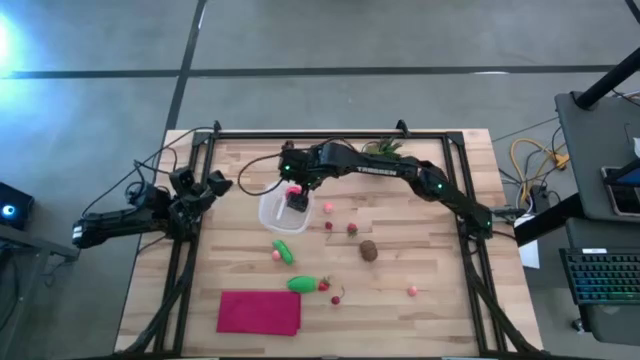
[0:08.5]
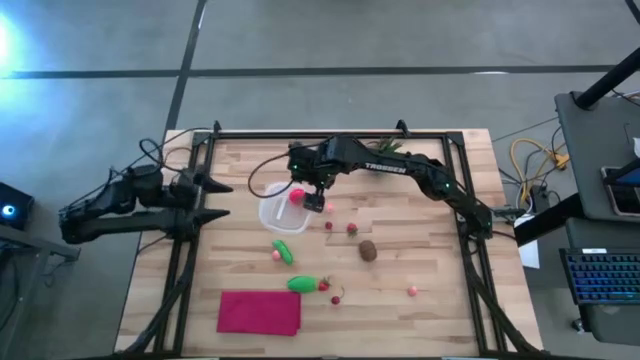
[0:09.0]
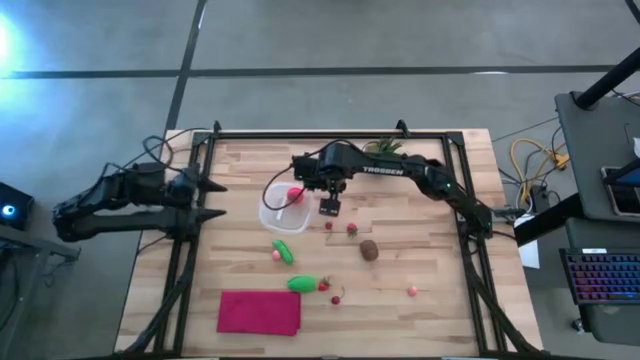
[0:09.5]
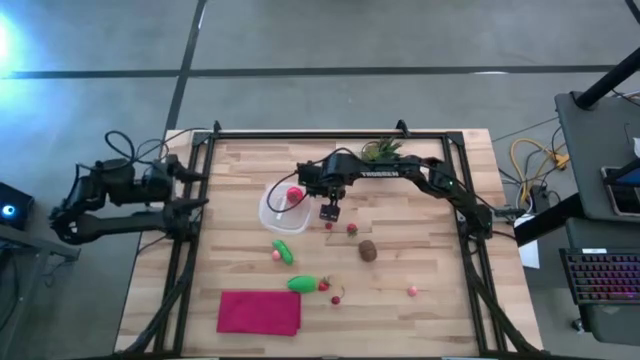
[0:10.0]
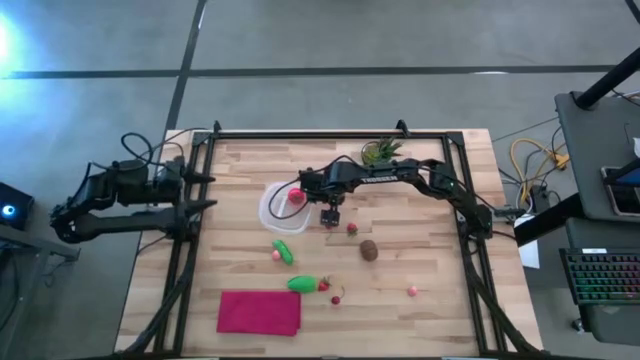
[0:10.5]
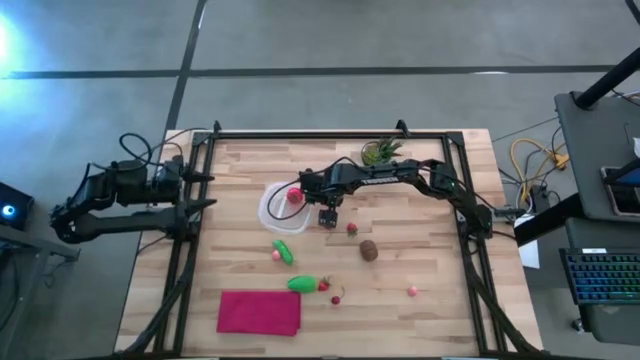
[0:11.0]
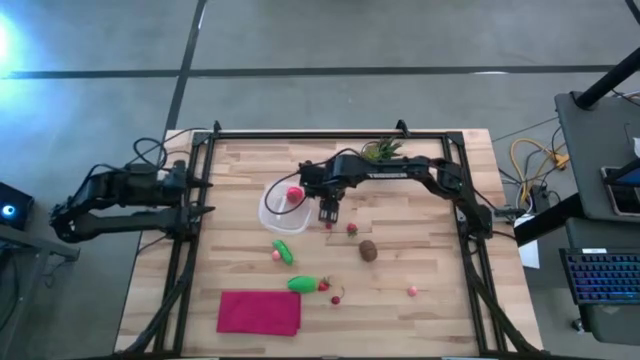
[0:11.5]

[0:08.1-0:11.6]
Task: Pick and placing Produce into tupperware
Put the top pink peach into the transparent bin

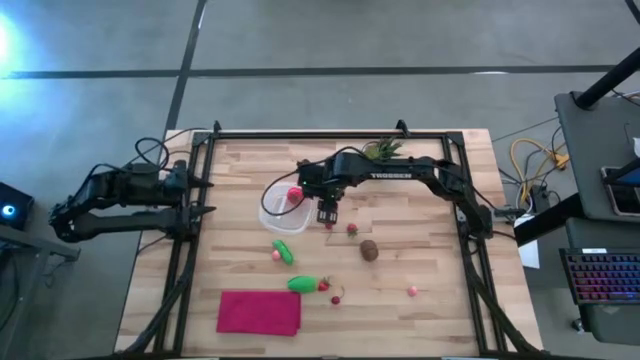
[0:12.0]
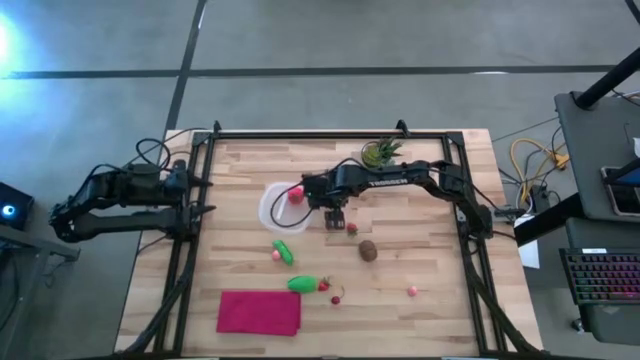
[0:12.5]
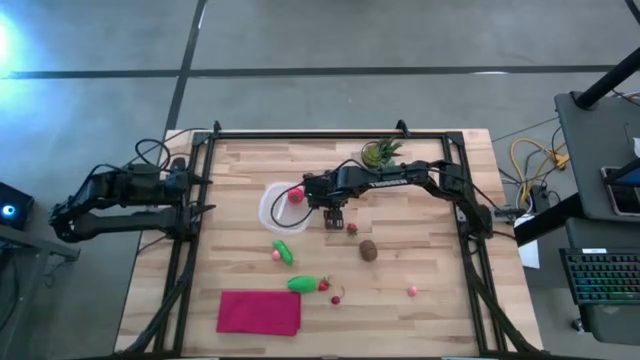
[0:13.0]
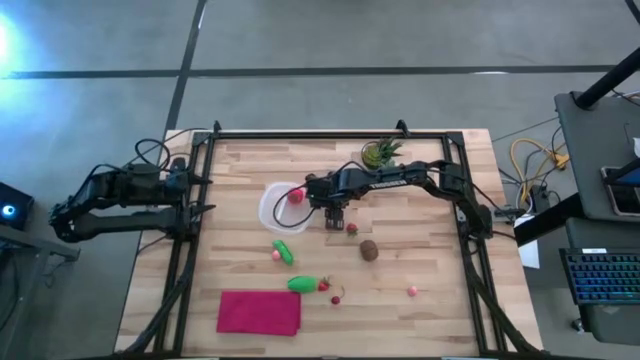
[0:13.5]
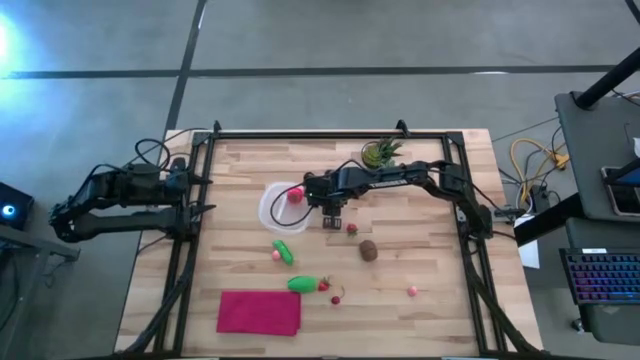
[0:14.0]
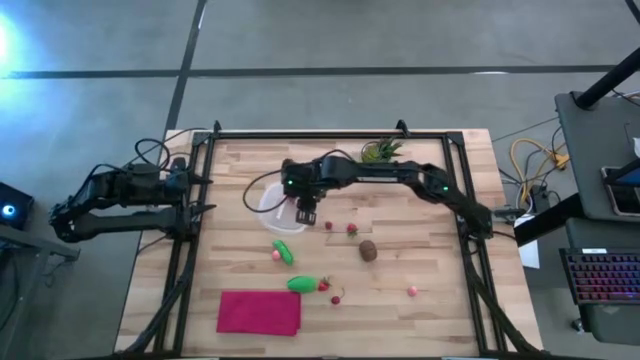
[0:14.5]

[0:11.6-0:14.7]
Put the top pink peach into the transparent bin

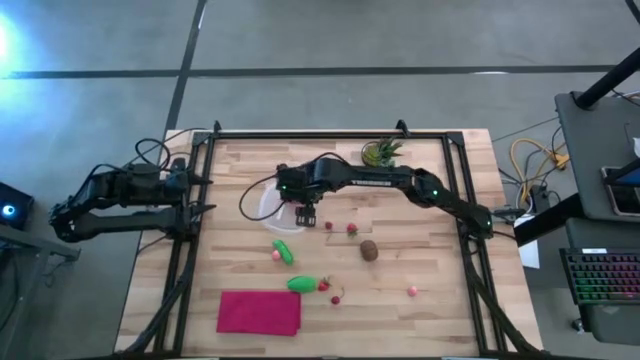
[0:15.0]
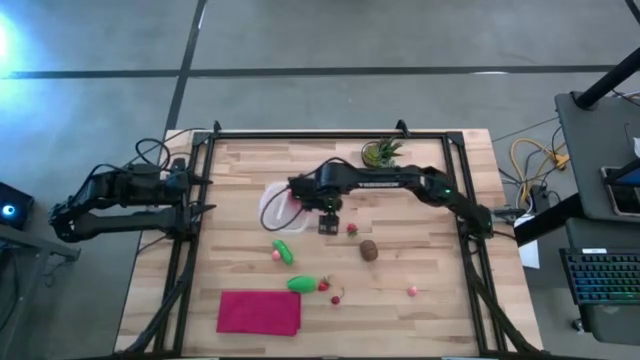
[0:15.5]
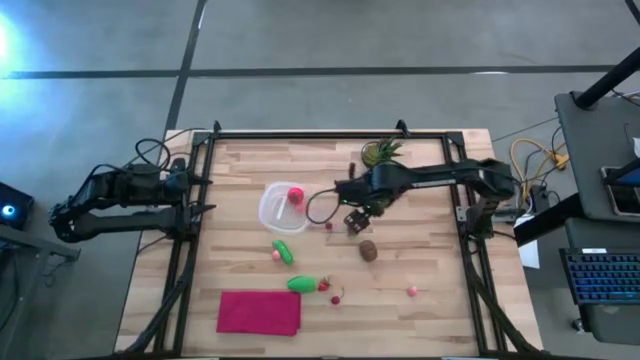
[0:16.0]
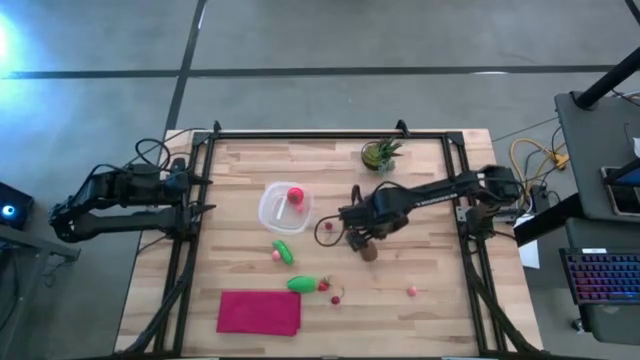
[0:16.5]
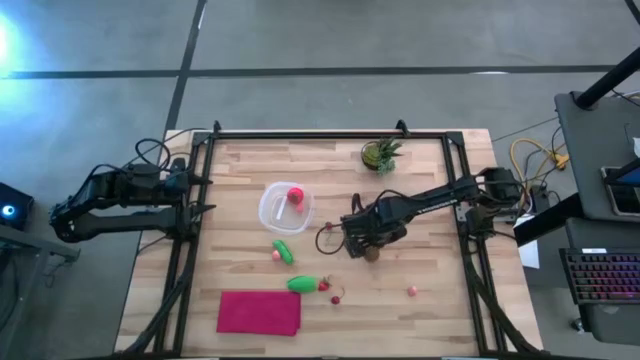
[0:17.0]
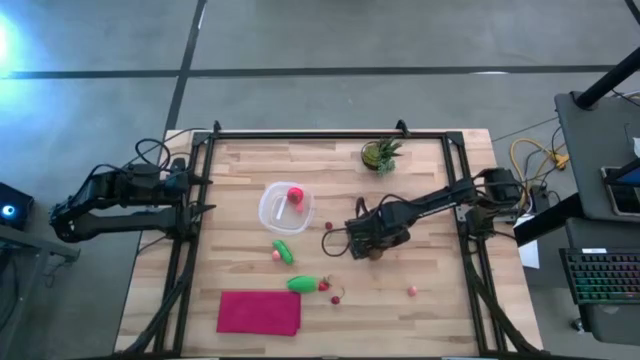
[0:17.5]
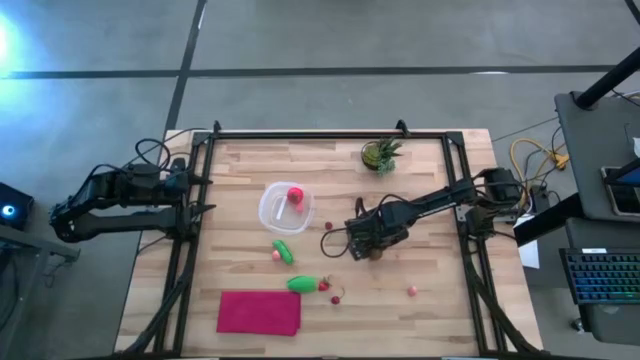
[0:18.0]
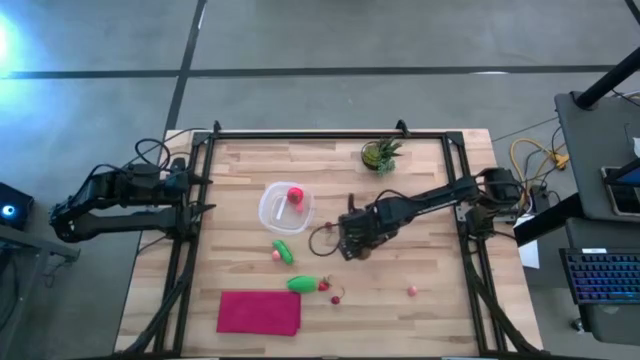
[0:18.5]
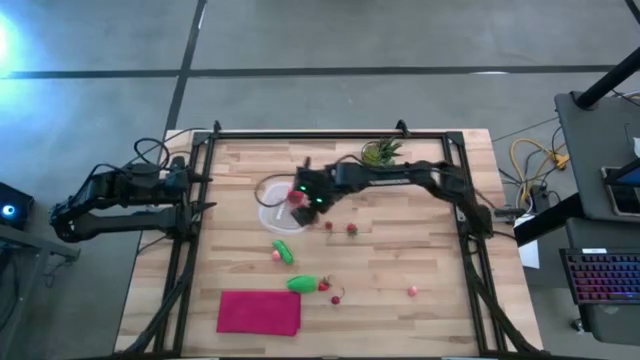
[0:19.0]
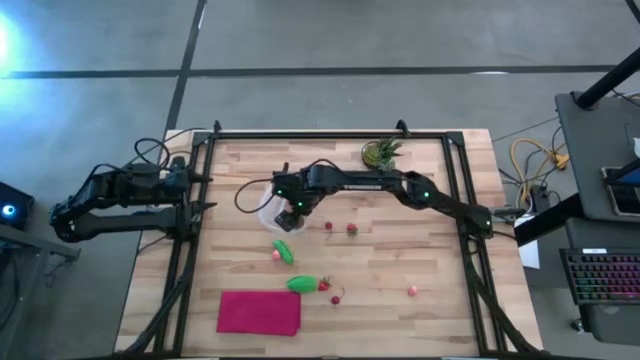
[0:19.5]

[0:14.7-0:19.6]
Put the brown kiwi into the transparent bin

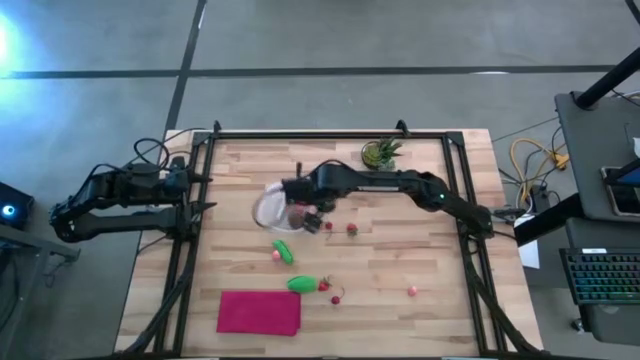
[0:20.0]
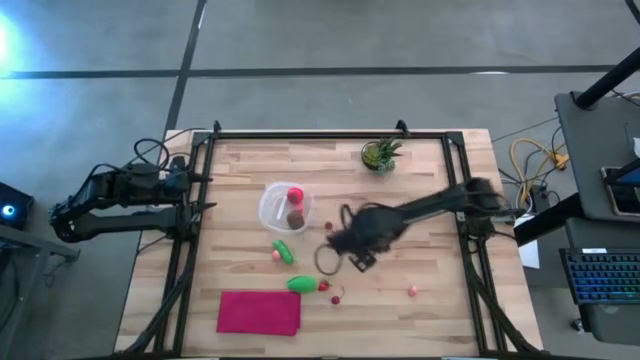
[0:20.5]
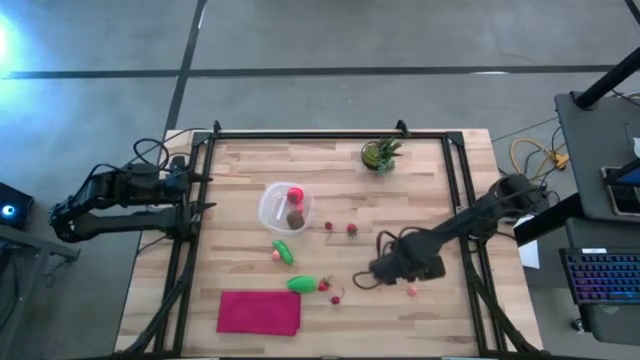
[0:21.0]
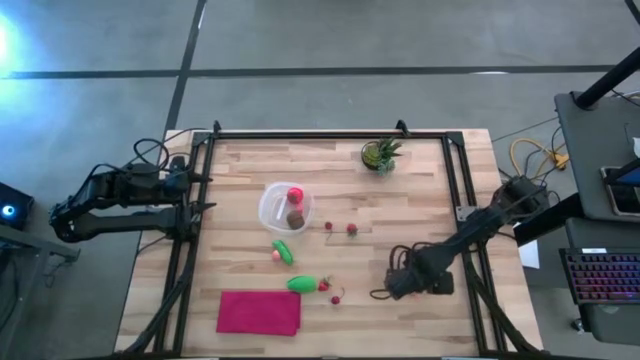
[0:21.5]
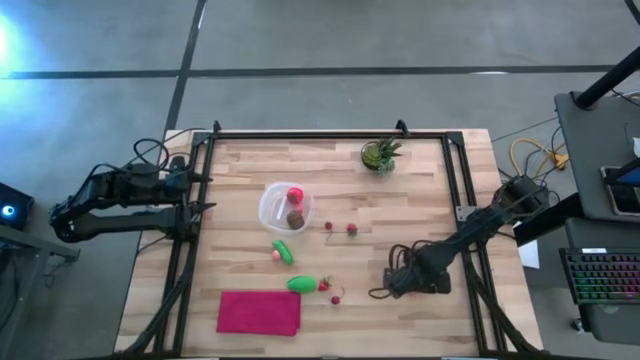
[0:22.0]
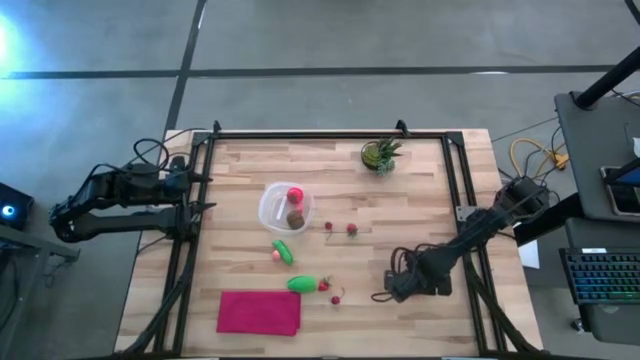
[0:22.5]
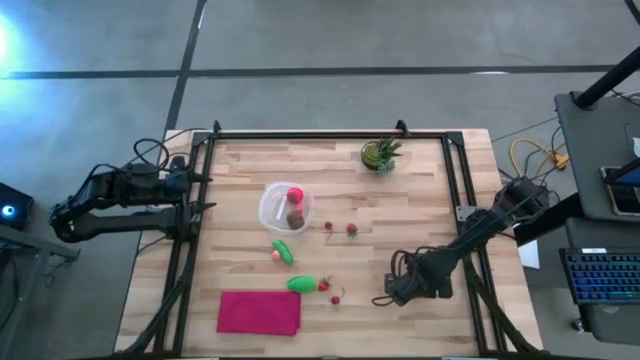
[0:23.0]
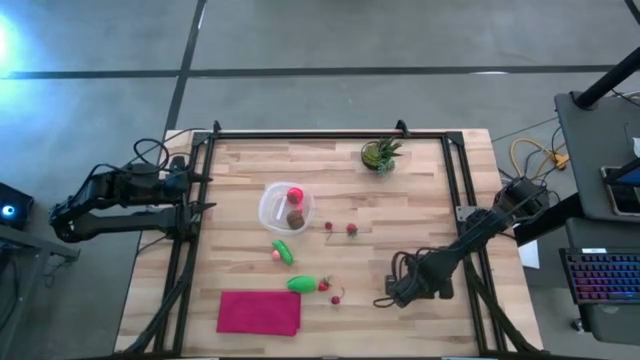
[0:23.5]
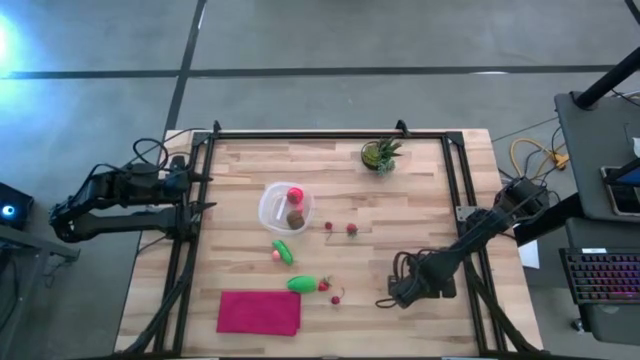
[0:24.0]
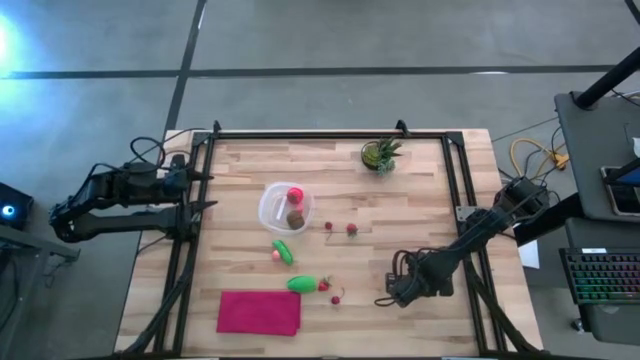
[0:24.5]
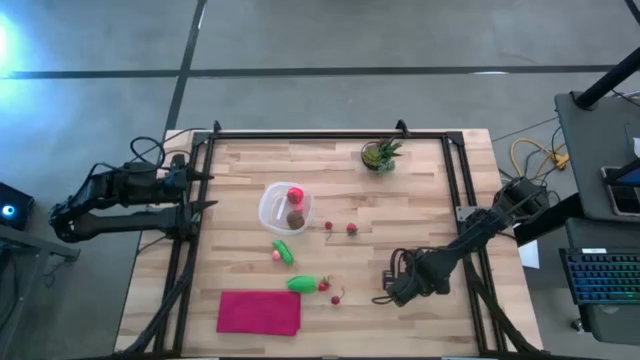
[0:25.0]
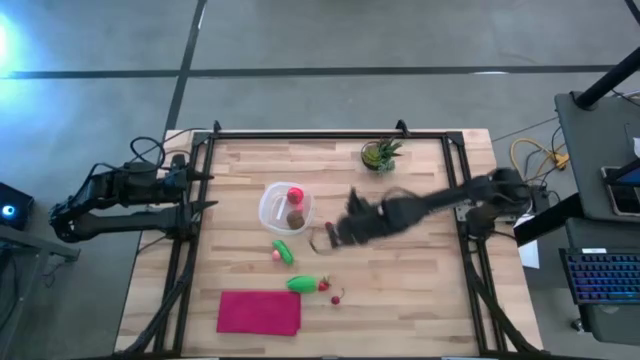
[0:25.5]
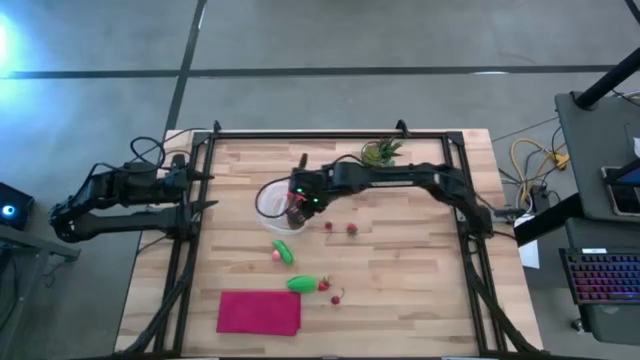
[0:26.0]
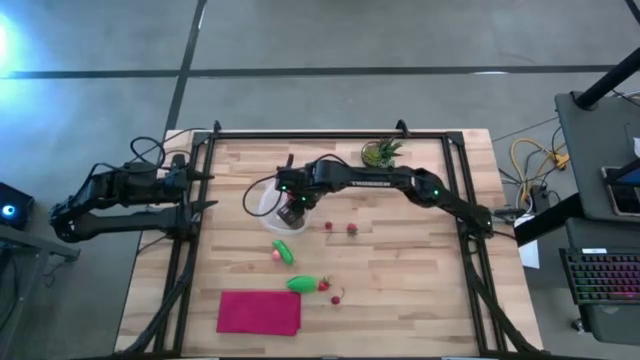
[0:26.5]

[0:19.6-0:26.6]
Put the right pink peach into the transparent bin

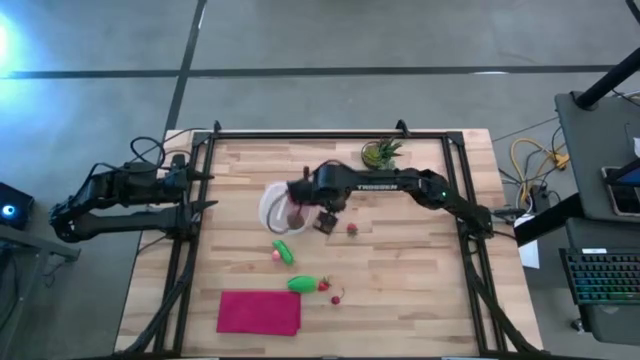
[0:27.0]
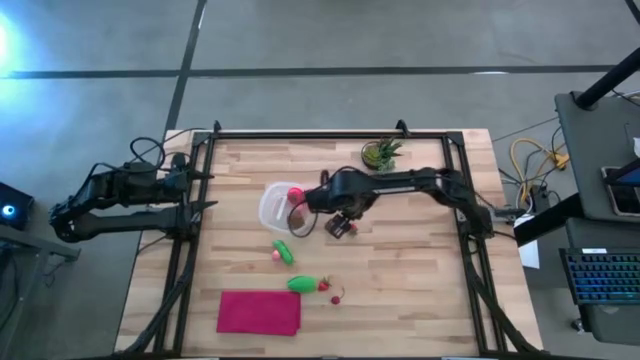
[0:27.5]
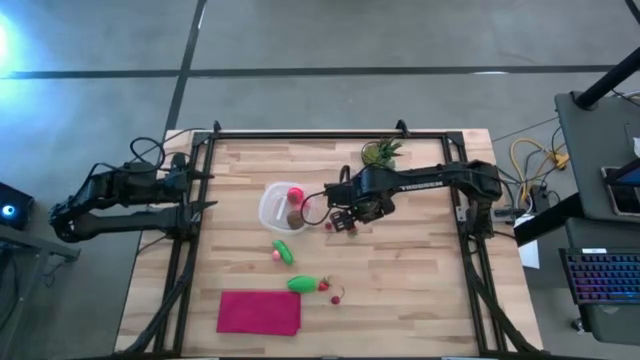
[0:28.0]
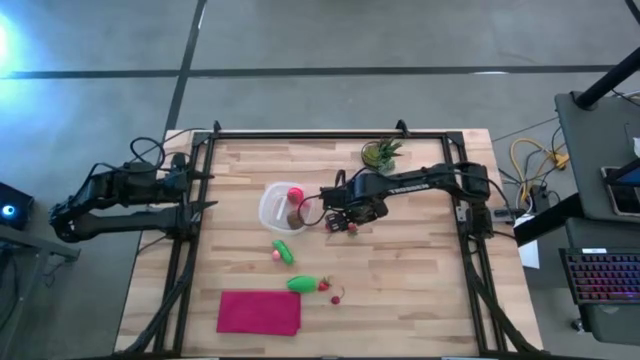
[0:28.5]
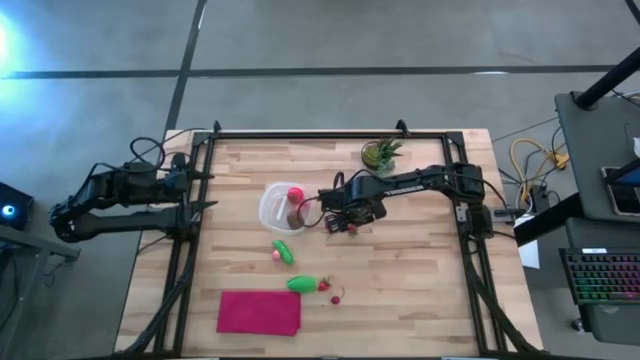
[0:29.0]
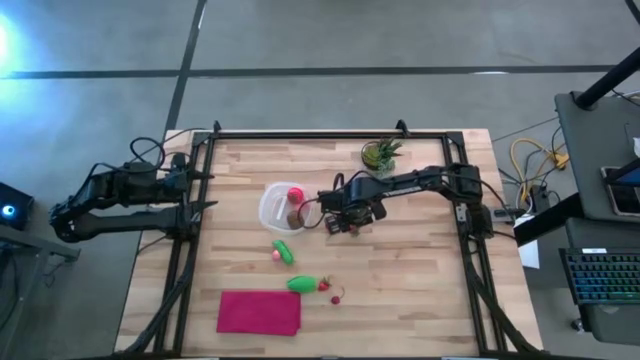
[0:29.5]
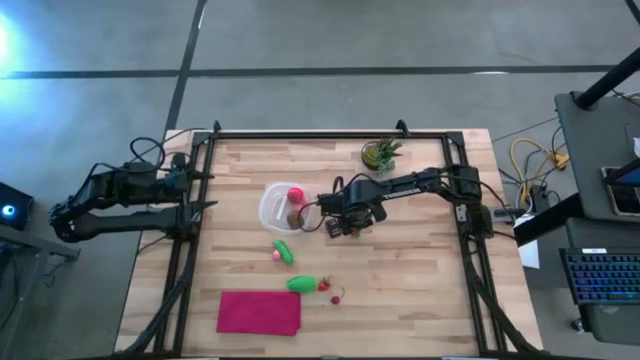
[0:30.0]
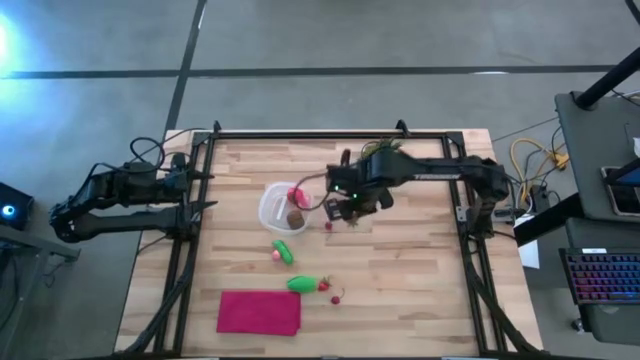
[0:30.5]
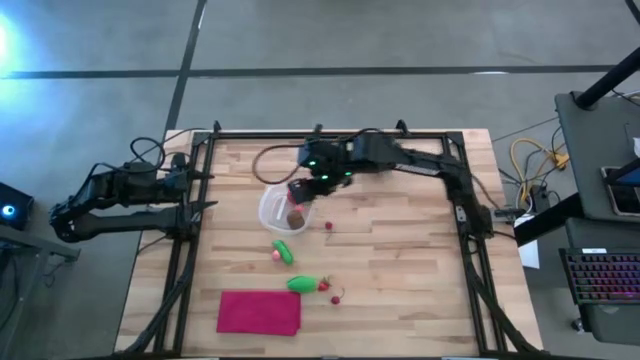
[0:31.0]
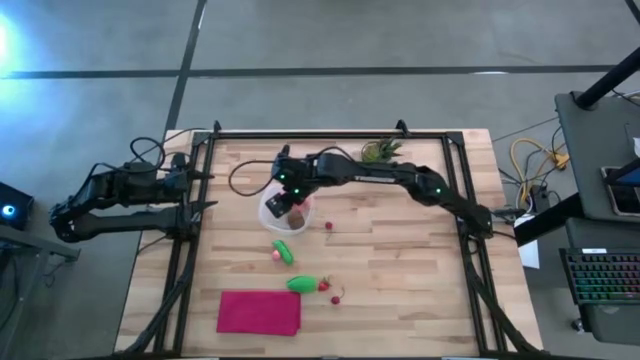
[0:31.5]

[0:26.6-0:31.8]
Put the top red strawberry into the transparent bin
